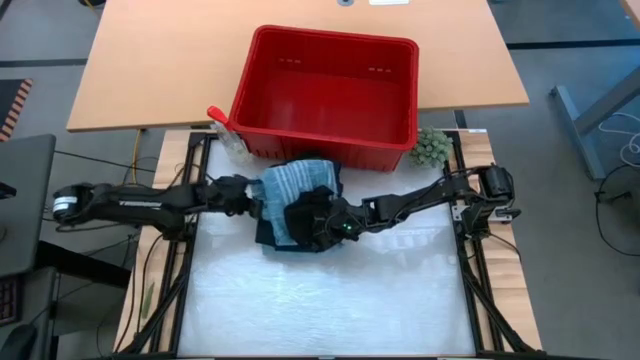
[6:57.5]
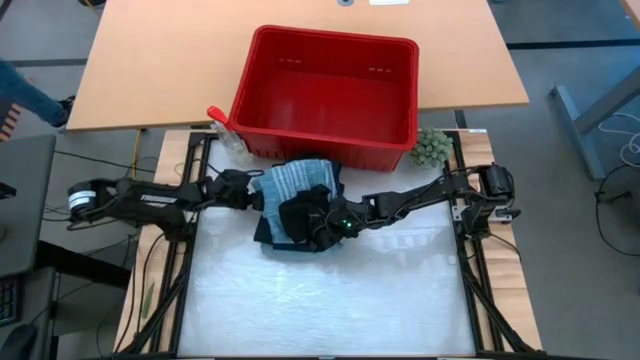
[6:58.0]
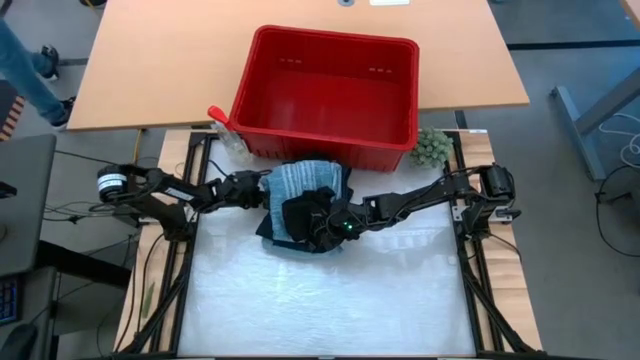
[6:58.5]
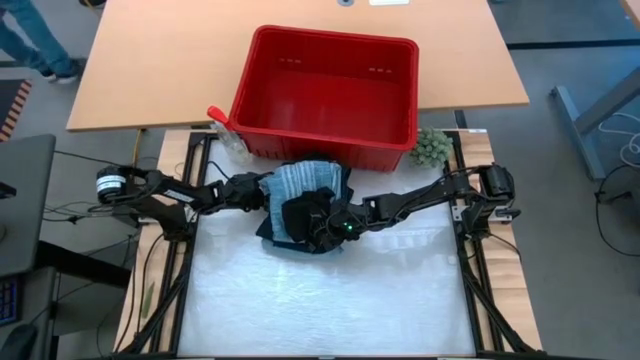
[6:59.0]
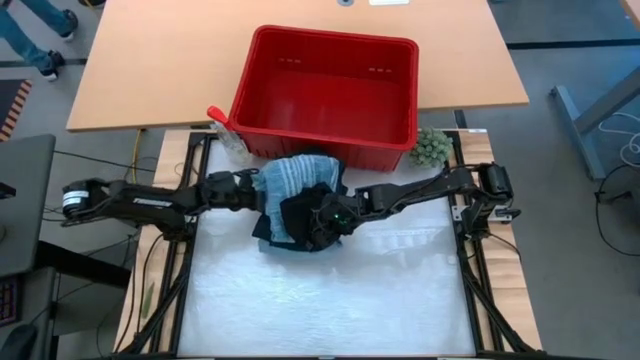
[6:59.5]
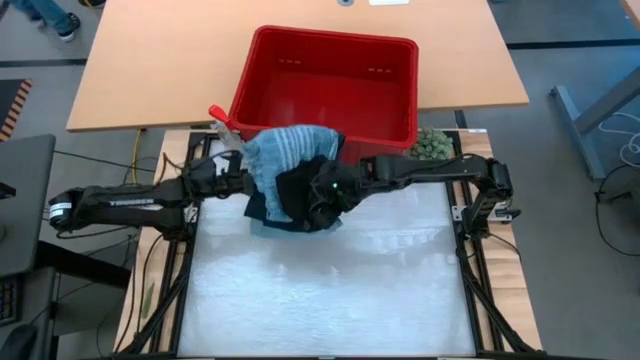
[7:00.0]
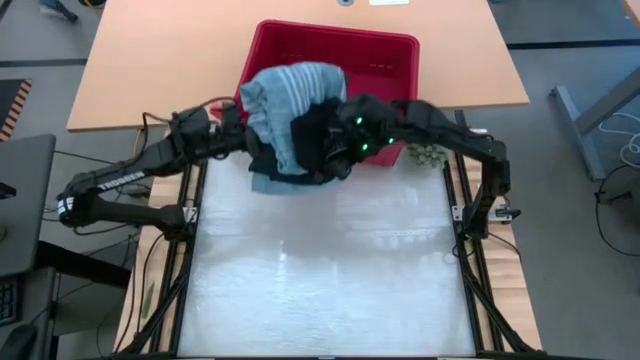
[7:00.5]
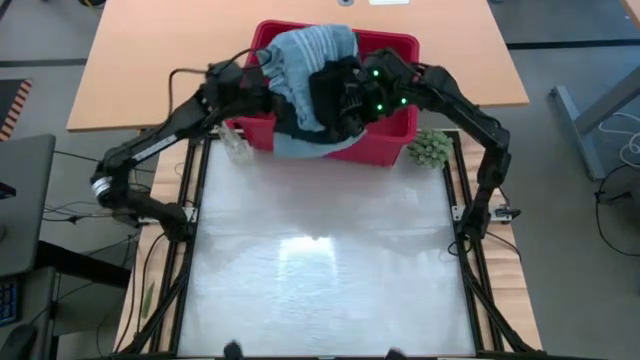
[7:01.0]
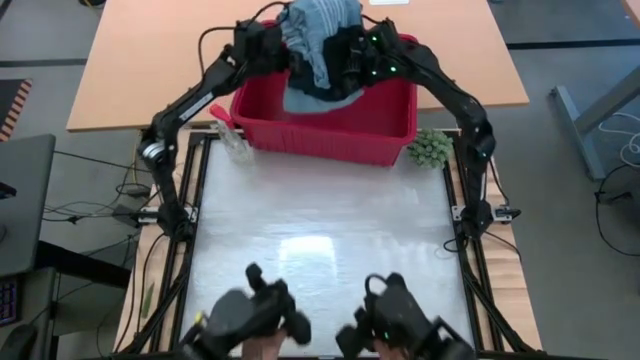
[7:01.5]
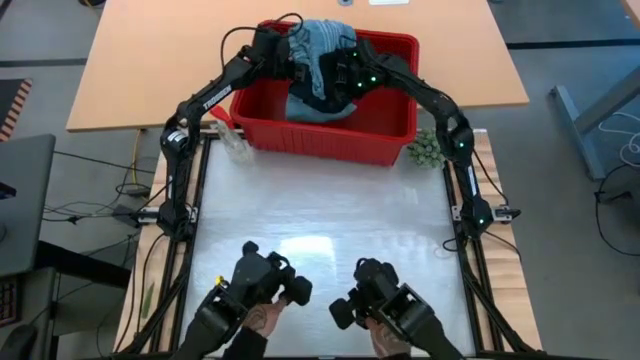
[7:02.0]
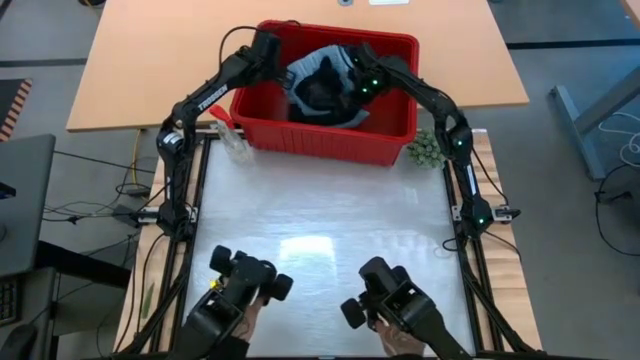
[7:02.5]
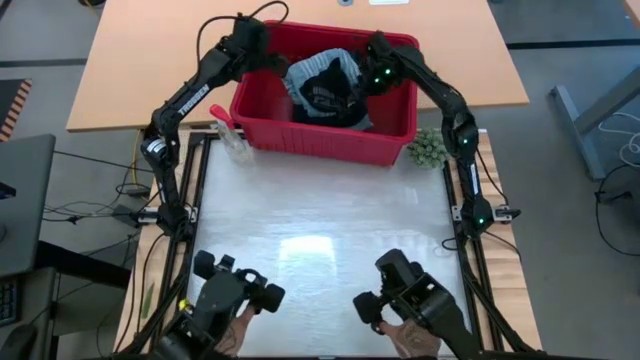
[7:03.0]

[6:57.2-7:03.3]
Task: Fold laundry
Put the folded blue and black pants, blue shirt, and black boxer into the red laundry bin

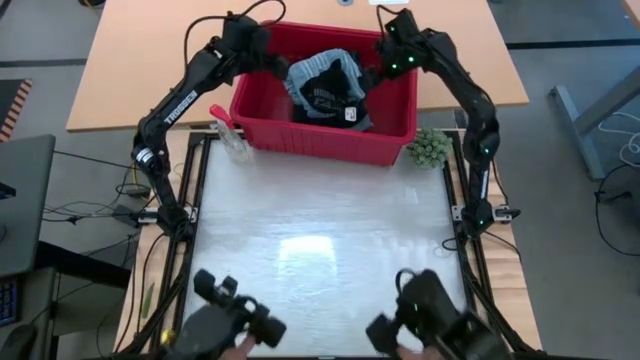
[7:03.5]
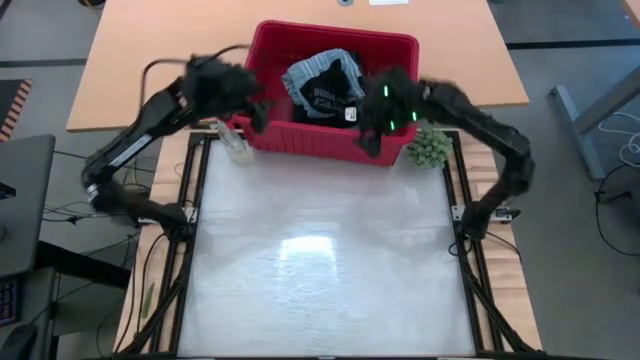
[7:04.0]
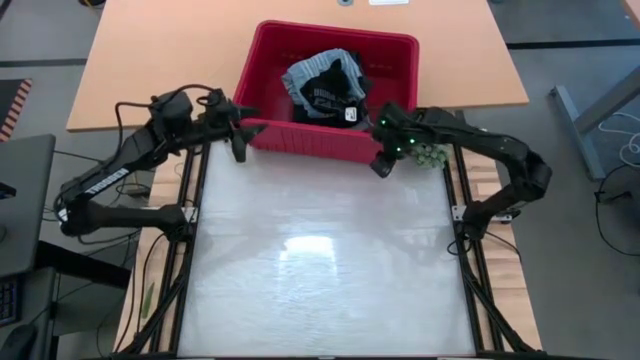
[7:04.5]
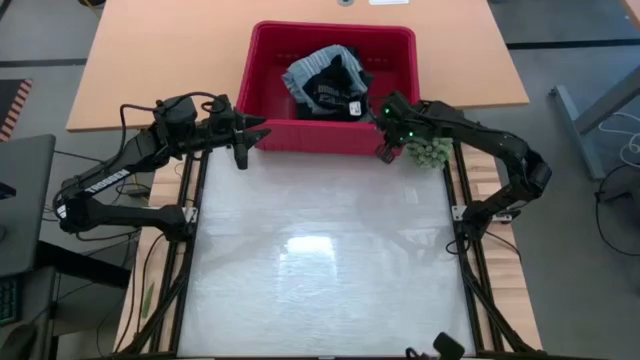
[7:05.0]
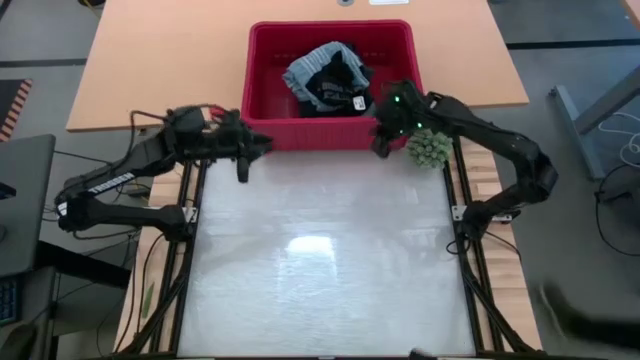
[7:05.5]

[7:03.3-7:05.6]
Adjust the red laundry bin

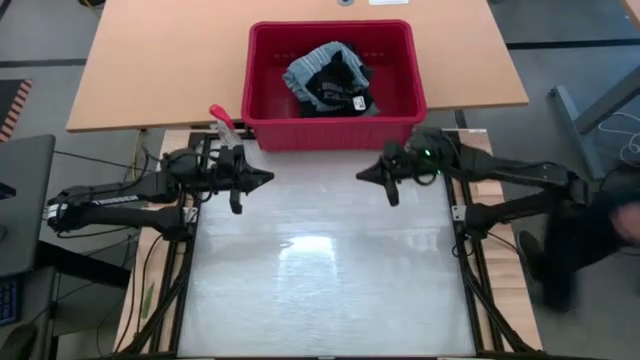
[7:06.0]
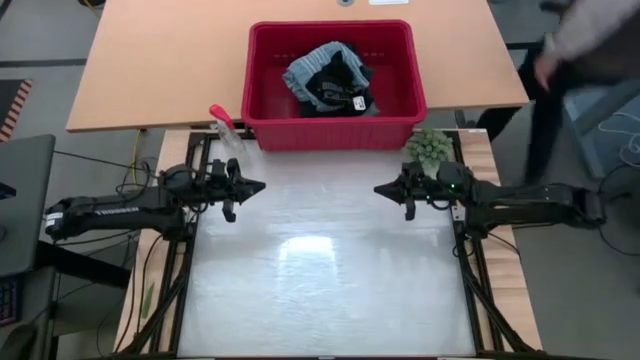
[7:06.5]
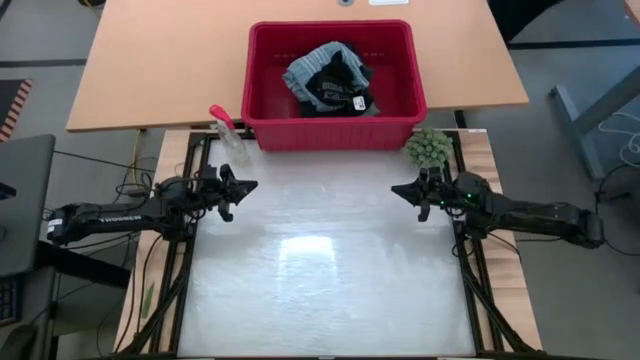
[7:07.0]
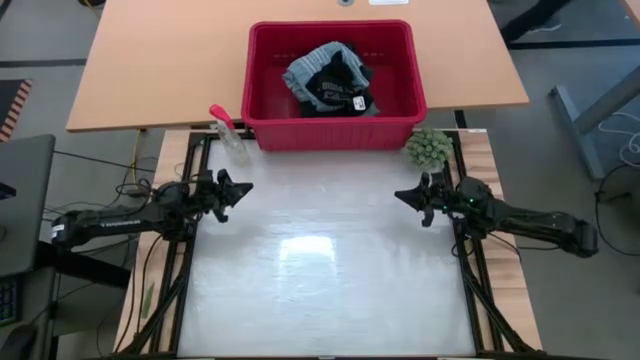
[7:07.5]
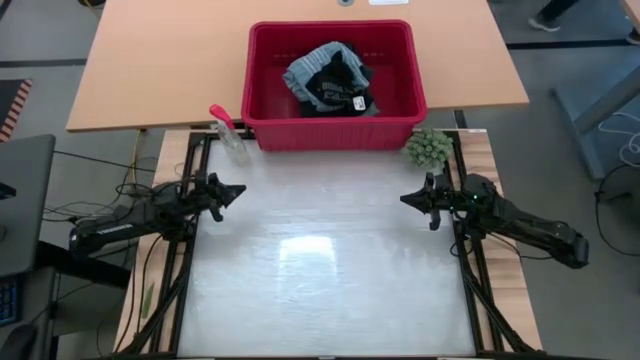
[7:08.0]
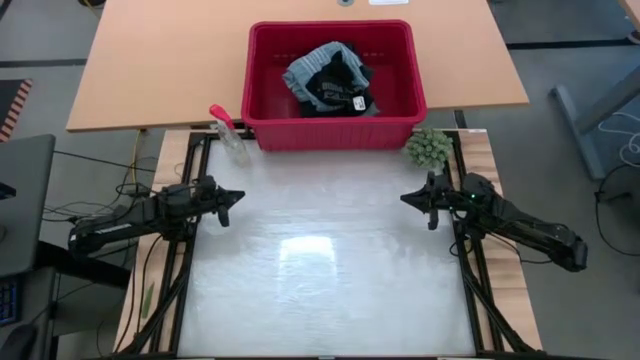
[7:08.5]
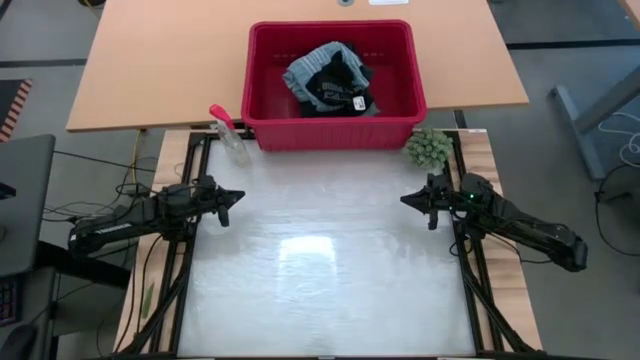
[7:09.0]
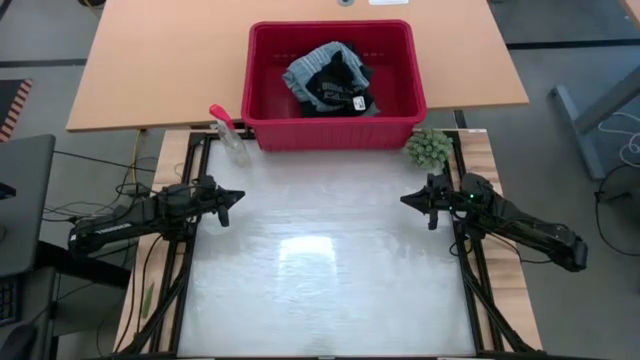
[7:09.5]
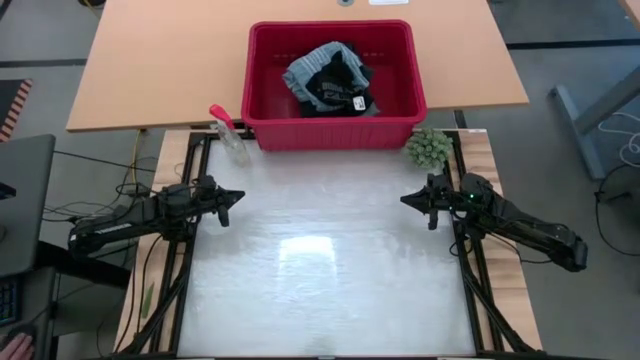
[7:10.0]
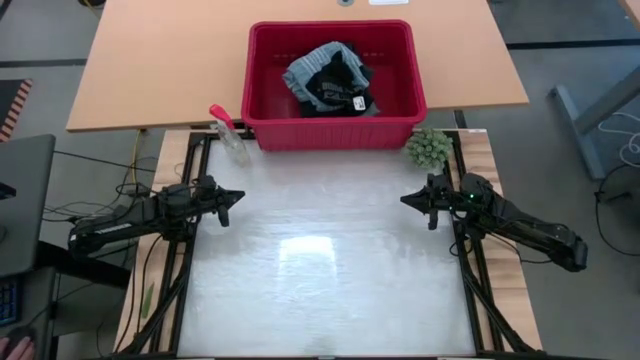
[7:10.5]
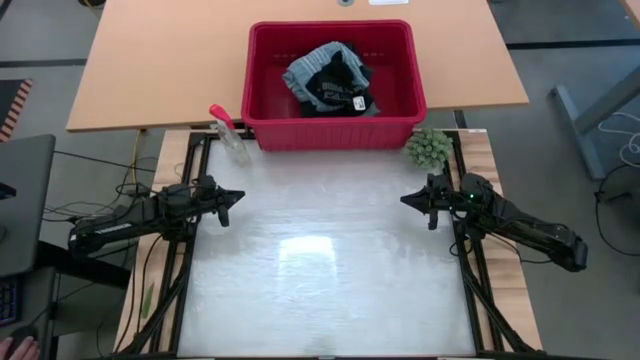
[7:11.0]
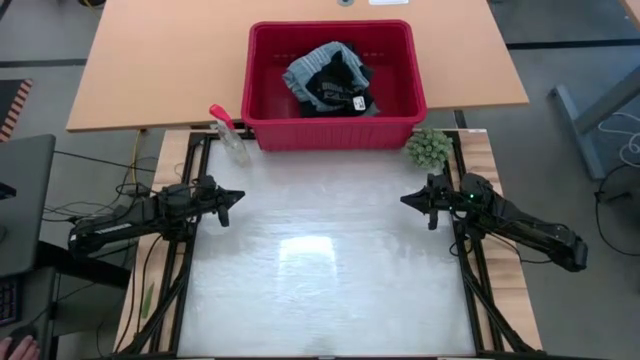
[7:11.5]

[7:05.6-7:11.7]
Return to Home Position

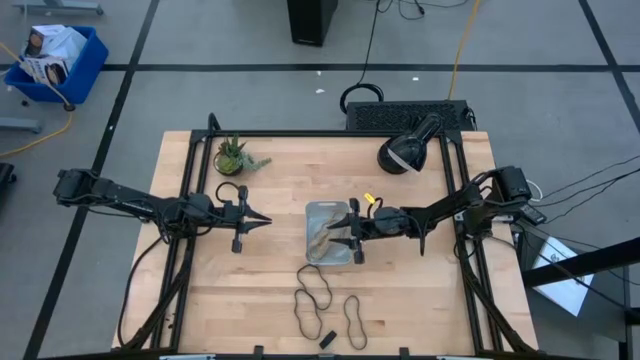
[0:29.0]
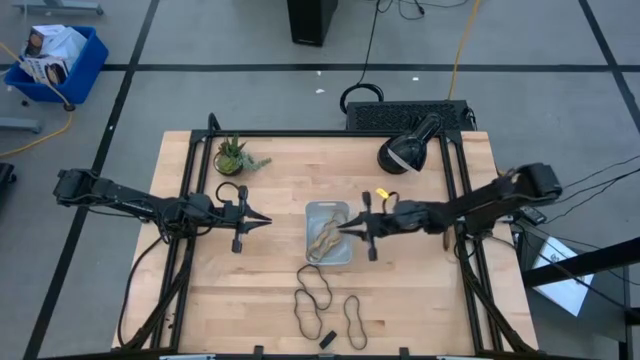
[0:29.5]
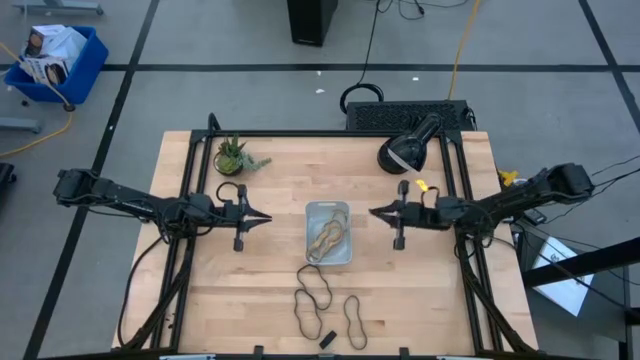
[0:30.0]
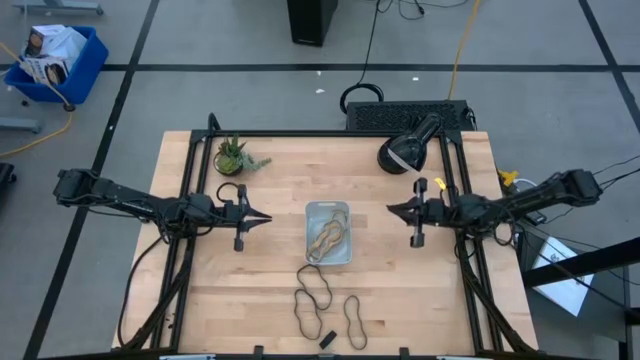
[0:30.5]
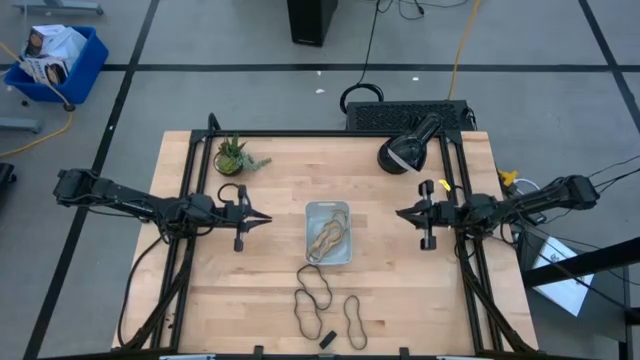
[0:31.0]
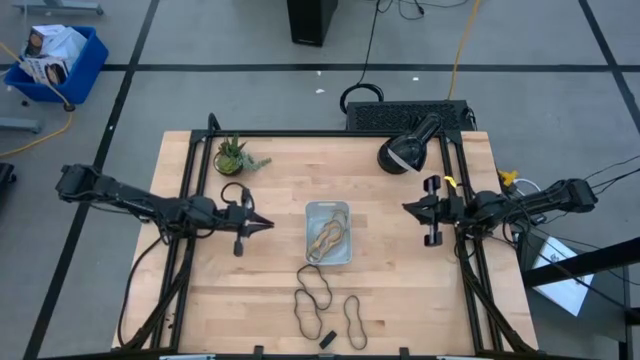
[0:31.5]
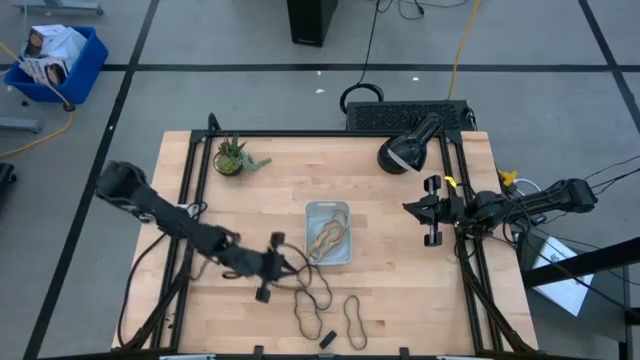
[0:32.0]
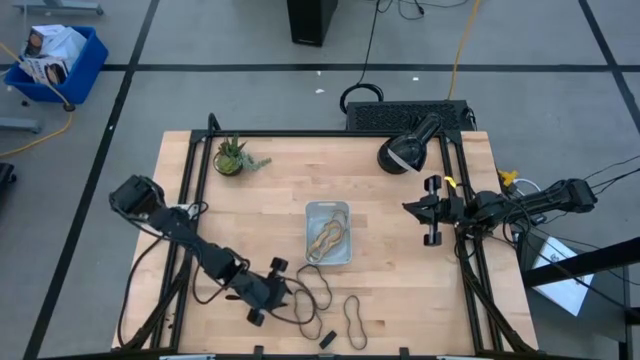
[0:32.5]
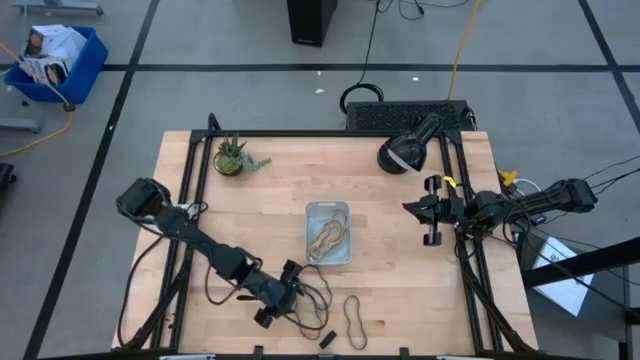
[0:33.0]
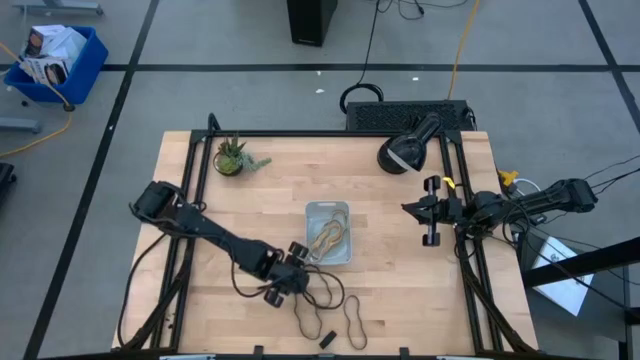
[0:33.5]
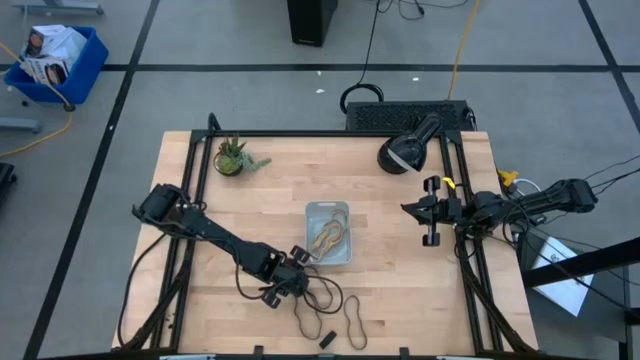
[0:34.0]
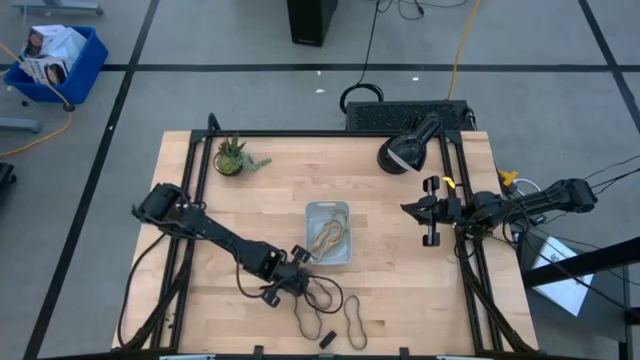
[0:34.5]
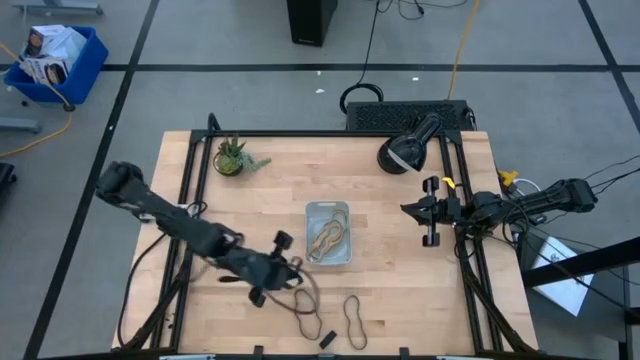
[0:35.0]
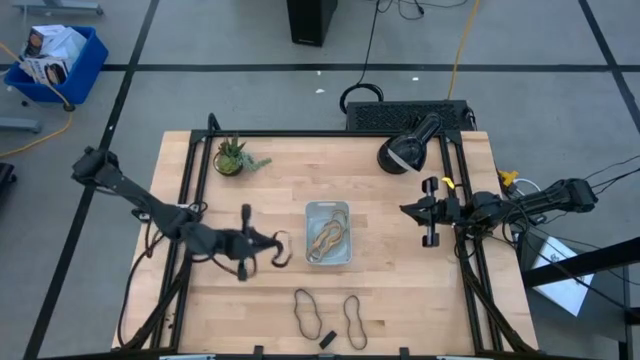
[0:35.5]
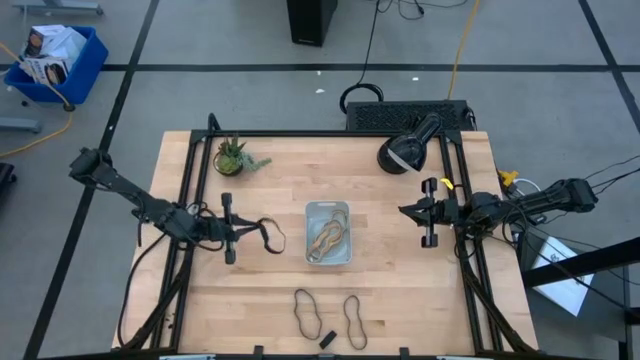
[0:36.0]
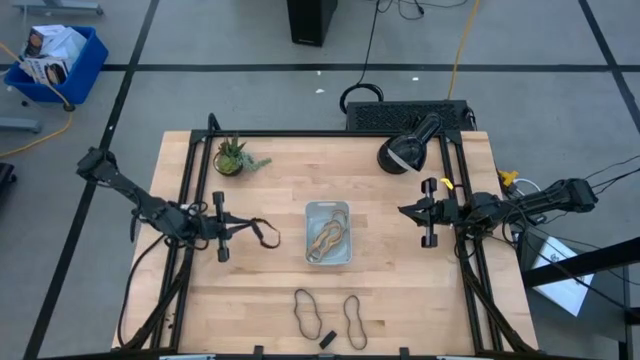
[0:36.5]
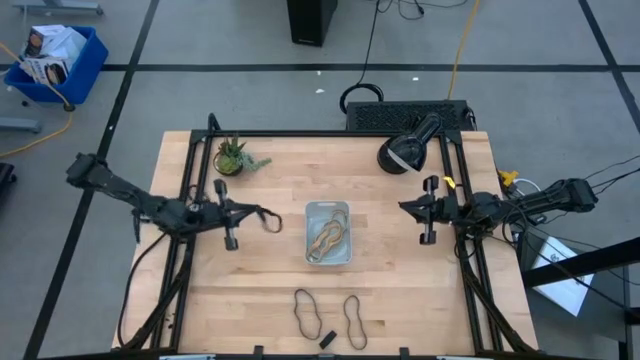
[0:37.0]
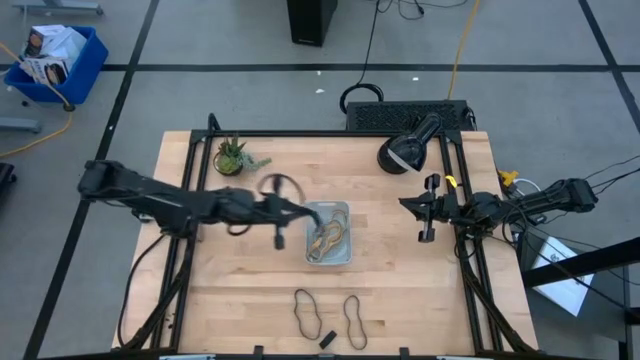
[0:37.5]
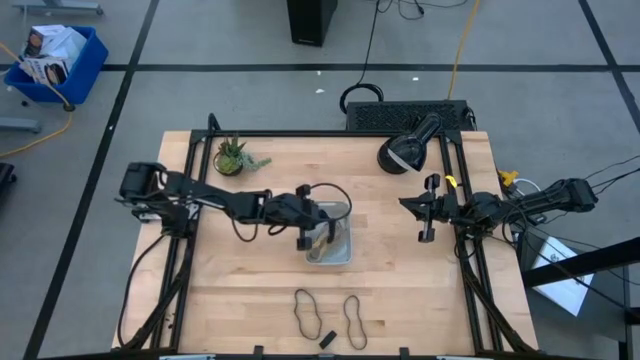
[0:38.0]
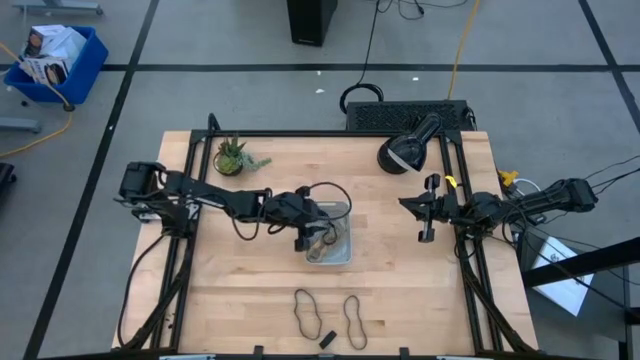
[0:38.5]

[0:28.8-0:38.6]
Task: Pick and place rubber bands into bin
Put the top black rubber band into the bin
